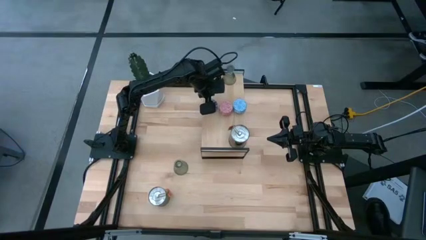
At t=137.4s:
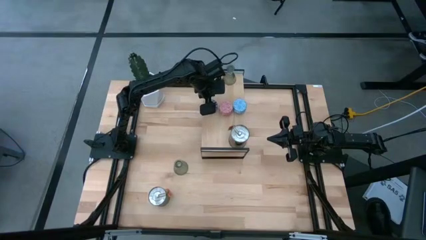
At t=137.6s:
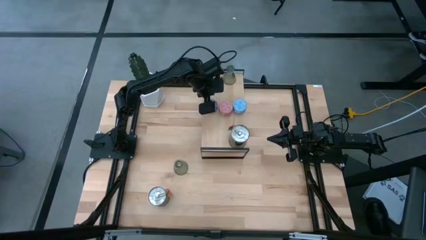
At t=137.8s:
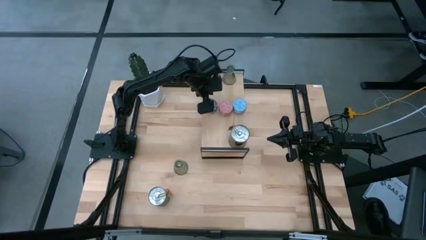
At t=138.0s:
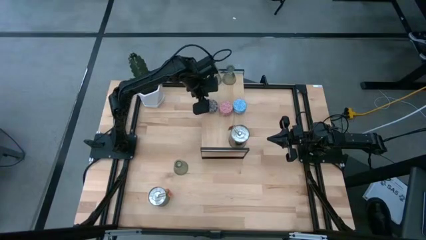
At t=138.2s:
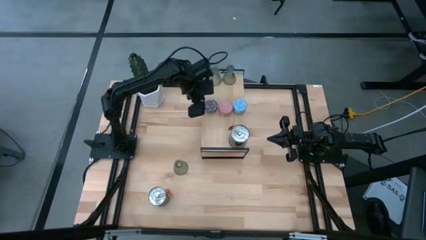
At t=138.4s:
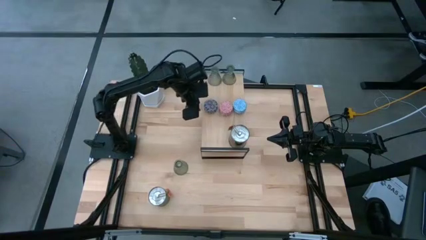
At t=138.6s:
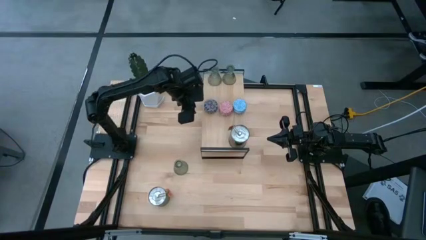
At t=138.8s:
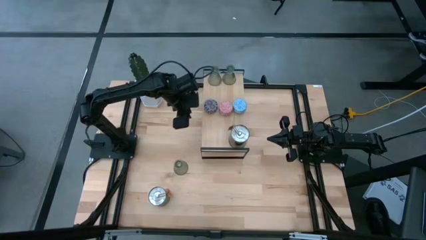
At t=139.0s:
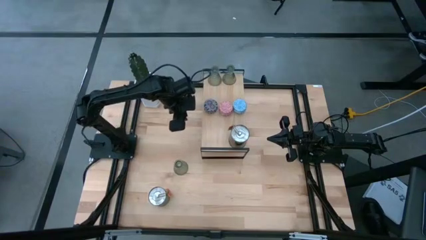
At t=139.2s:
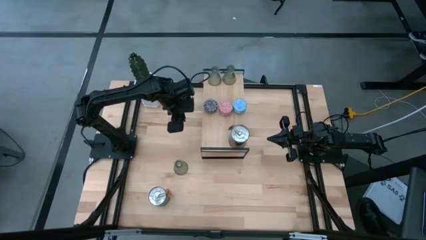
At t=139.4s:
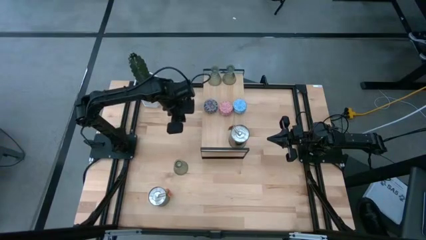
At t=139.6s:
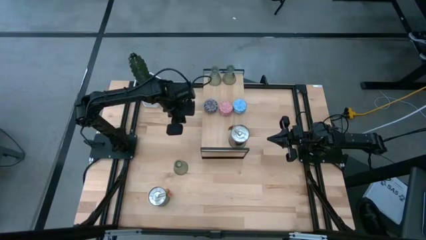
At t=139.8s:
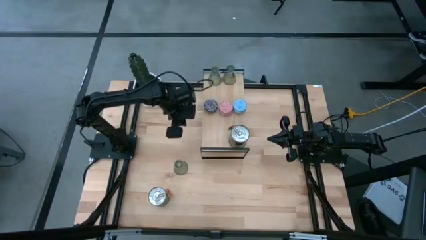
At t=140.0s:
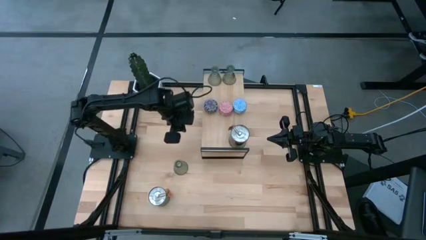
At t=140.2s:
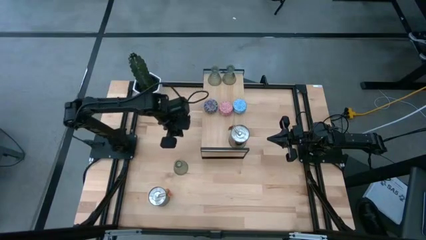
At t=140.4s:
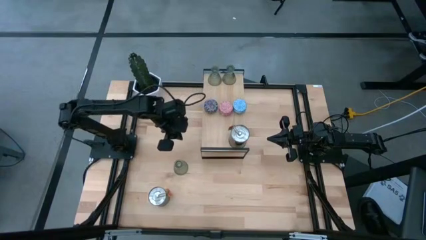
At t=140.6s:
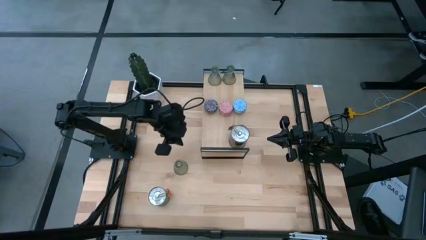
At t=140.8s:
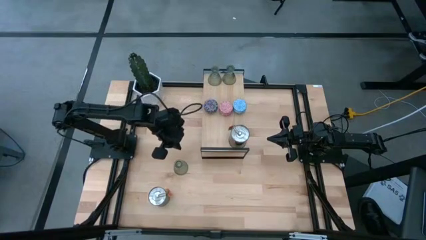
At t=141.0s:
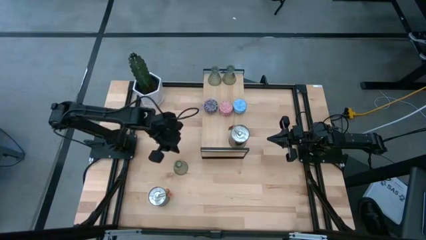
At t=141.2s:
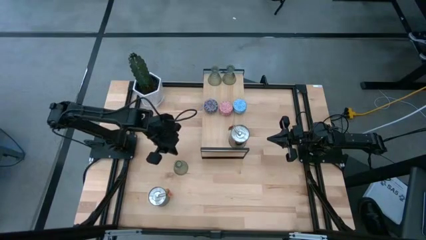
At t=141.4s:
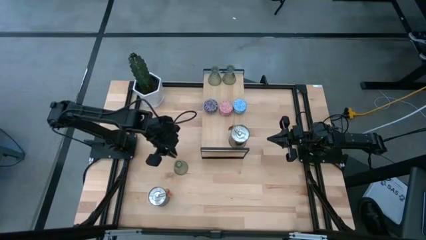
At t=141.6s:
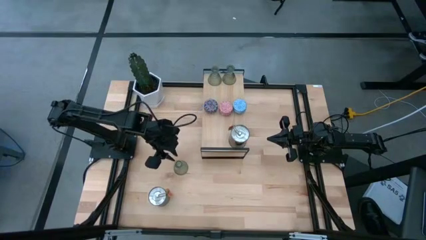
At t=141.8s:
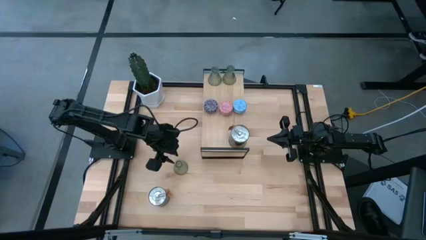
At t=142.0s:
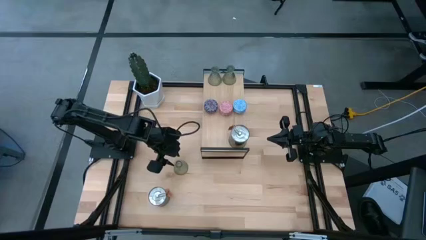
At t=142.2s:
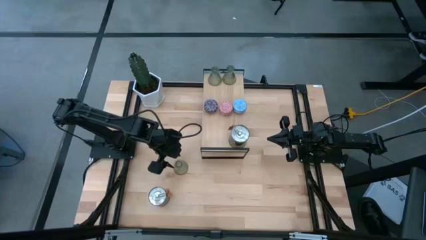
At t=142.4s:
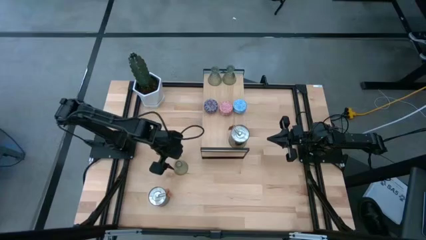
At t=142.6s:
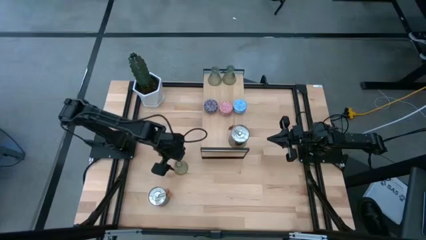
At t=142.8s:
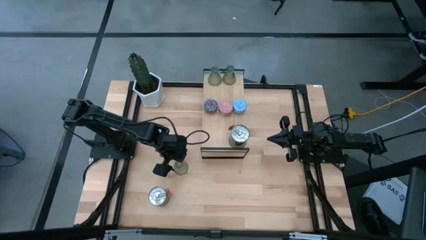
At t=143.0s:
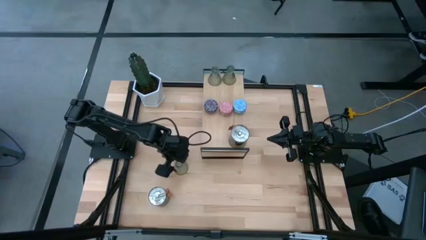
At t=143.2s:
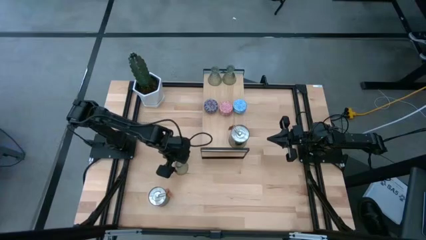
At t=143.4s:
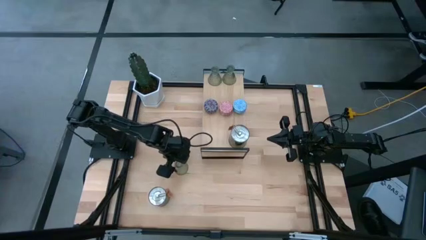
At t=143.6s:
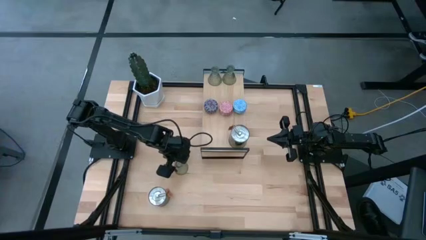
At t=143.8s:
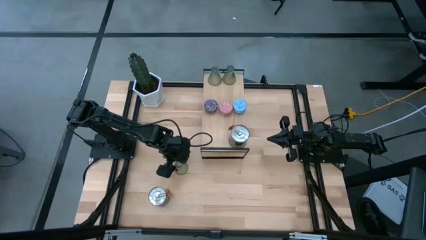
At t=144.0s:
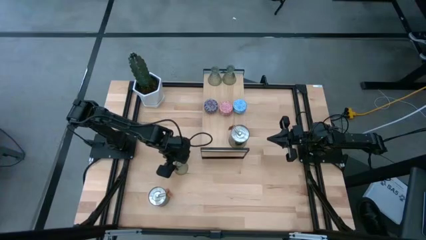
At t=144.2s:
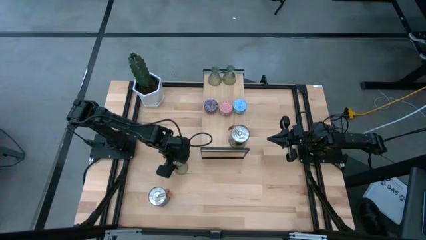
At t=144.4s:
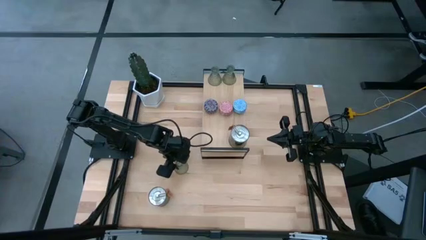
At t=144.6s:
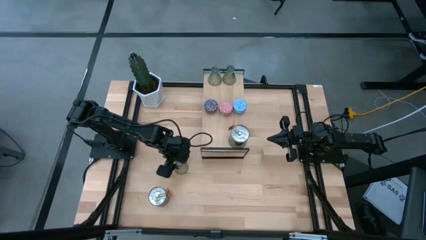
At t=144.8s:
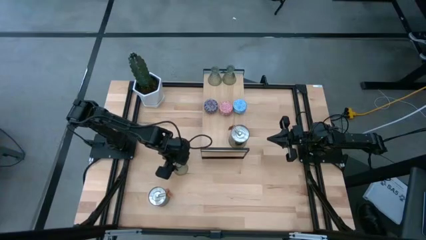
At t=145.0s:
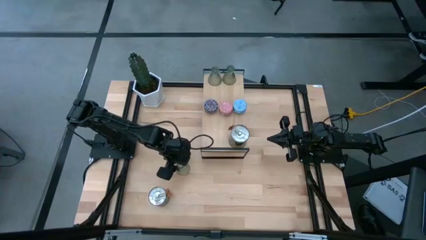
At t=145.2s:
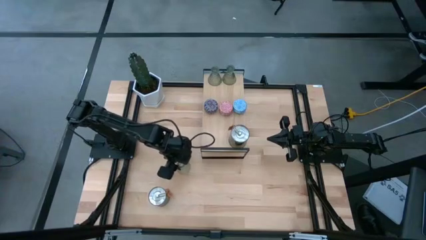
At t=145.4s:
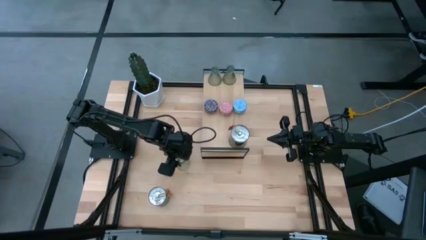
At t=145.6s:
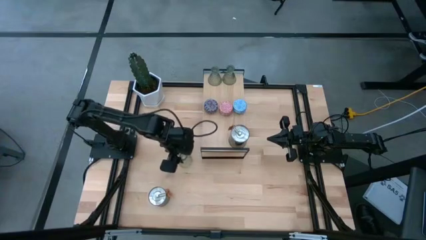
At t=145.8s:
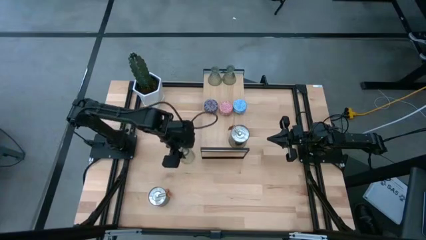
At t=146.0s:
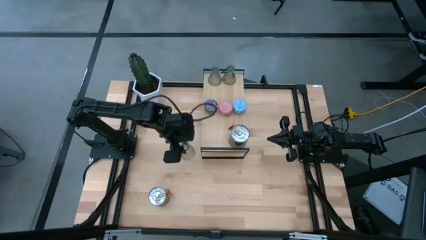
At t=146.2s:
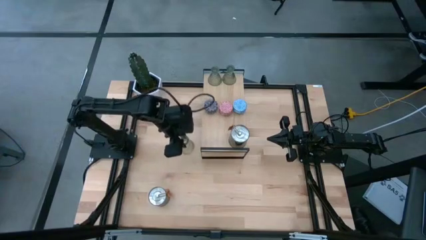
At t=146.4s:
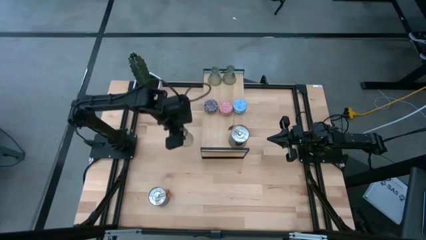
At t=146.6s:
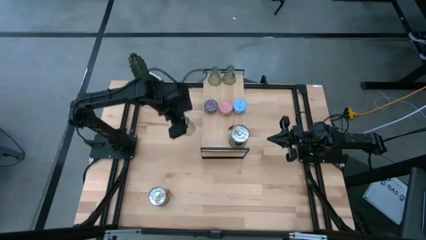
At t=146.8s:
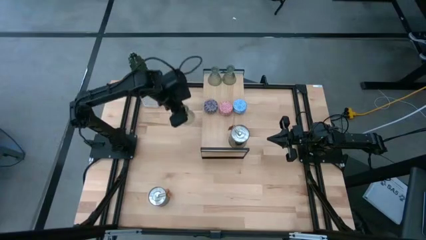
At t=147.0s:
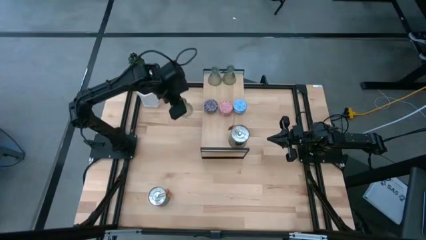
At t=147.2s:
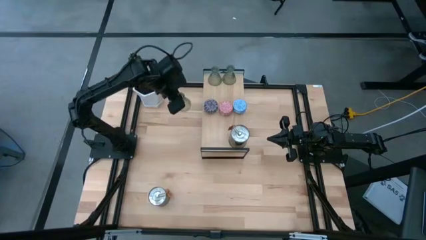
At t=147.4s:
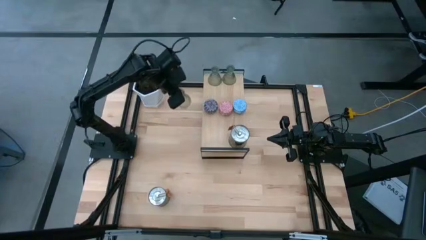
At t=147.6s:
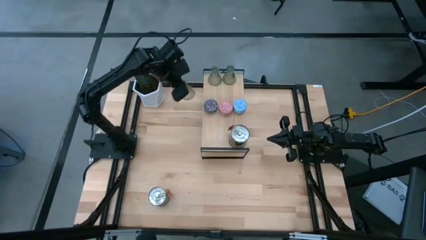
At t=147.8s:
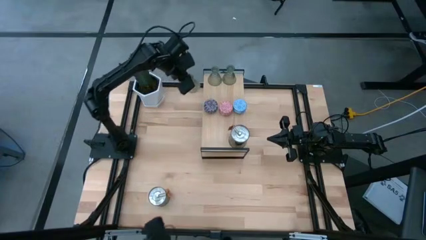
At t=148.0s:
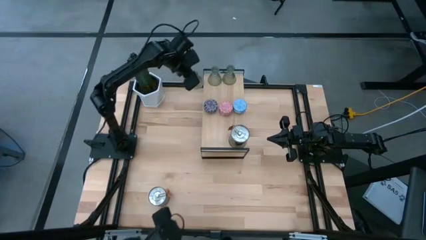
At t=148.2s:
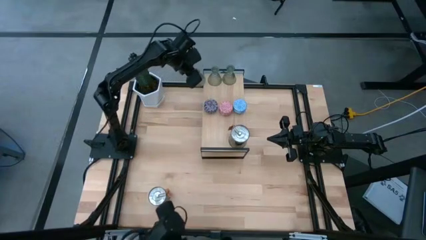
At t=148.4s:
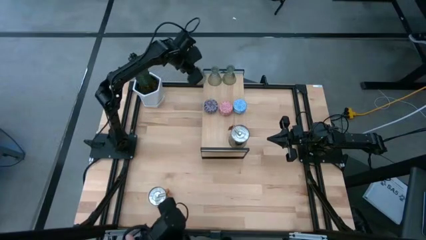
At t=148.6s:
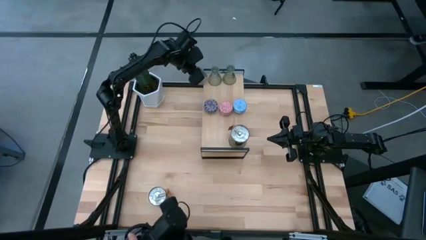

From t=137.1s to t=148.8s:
Task: Pick & Place candle stick holders
Put the transparent candle holder on the shelf

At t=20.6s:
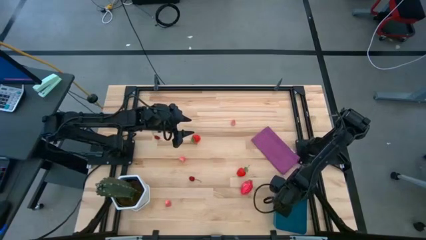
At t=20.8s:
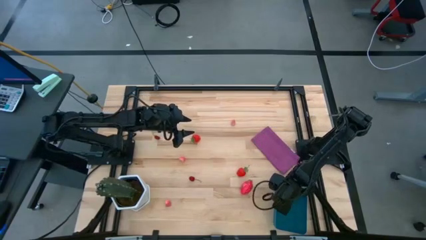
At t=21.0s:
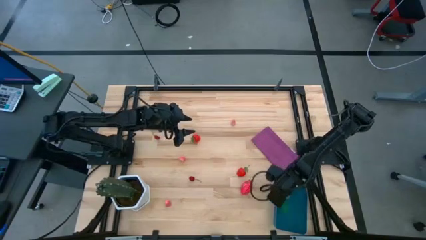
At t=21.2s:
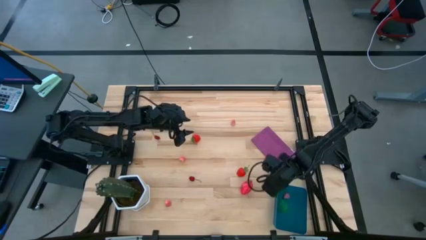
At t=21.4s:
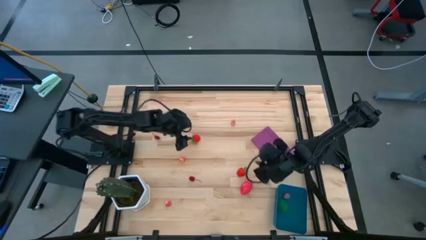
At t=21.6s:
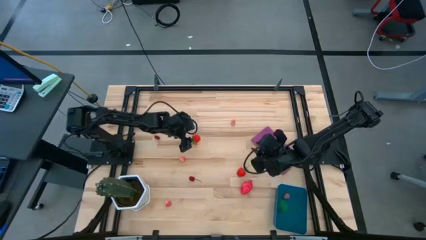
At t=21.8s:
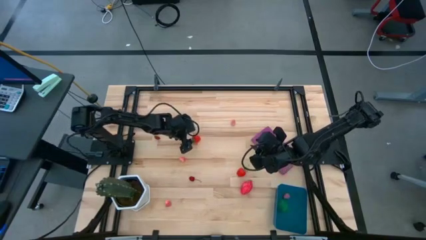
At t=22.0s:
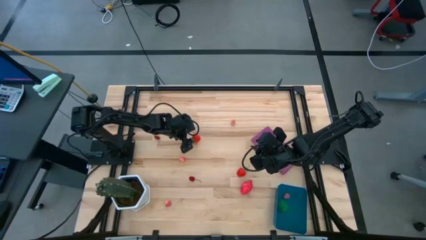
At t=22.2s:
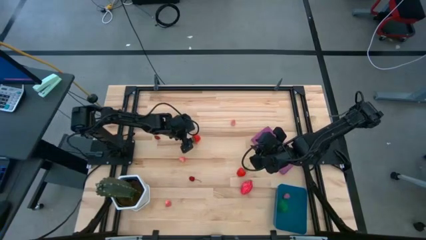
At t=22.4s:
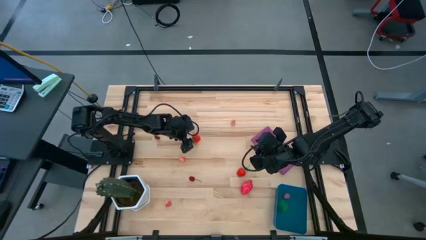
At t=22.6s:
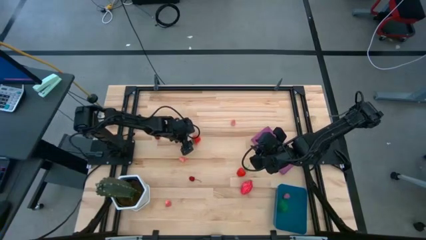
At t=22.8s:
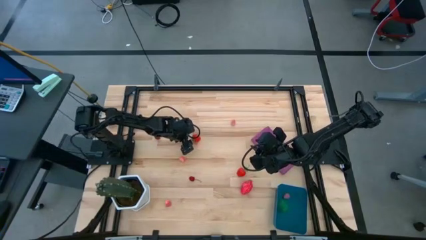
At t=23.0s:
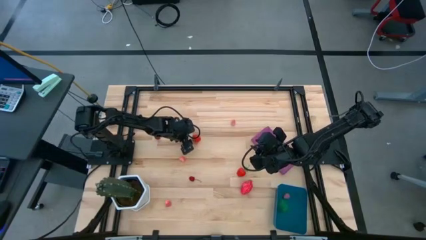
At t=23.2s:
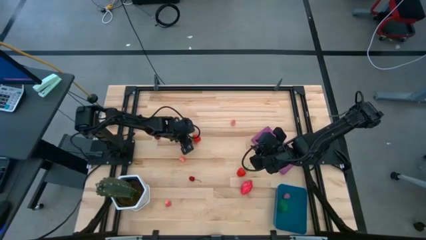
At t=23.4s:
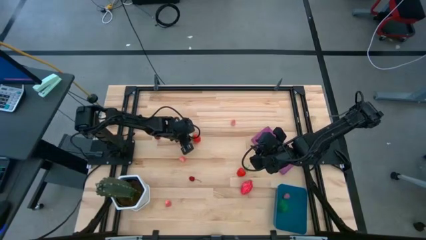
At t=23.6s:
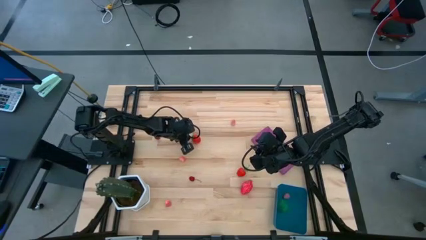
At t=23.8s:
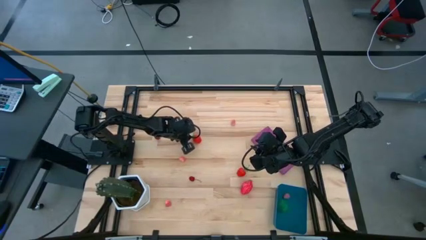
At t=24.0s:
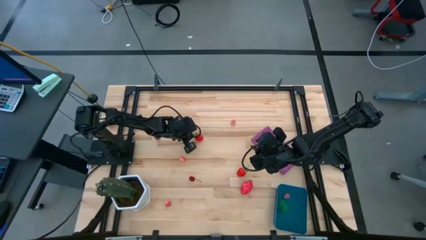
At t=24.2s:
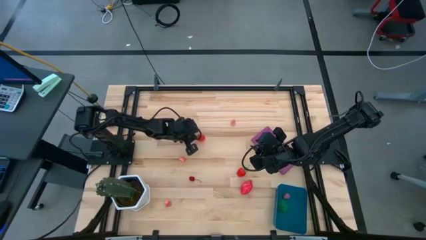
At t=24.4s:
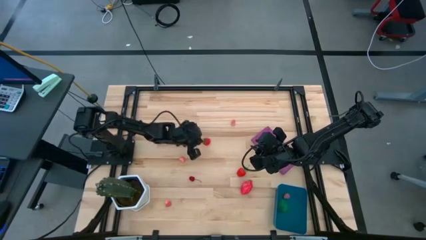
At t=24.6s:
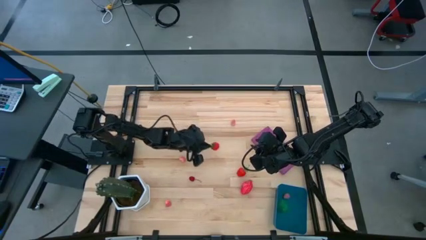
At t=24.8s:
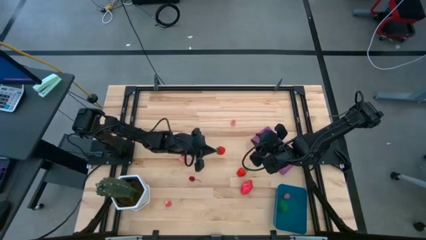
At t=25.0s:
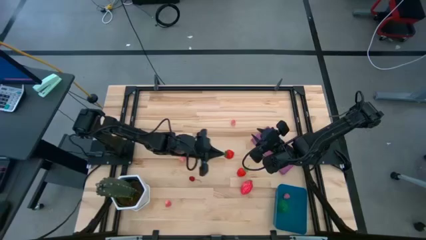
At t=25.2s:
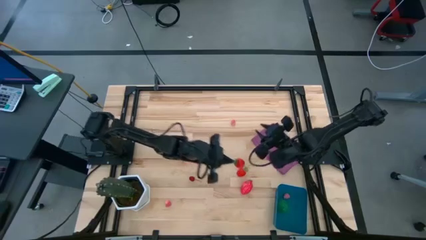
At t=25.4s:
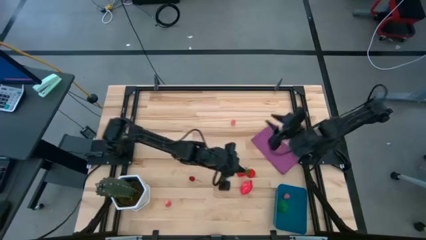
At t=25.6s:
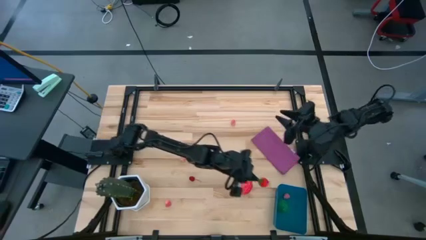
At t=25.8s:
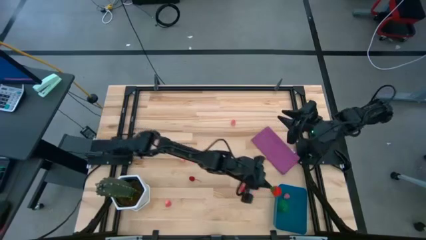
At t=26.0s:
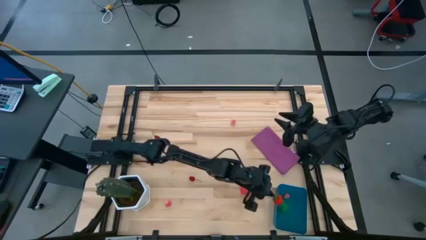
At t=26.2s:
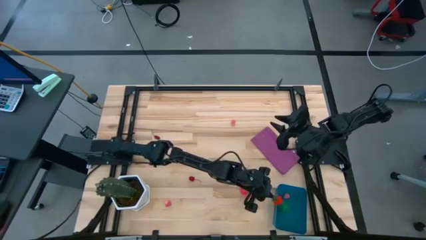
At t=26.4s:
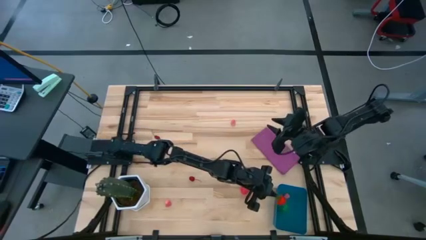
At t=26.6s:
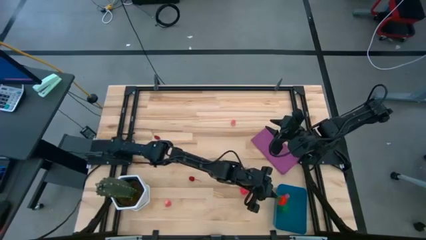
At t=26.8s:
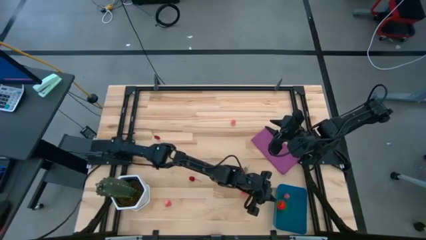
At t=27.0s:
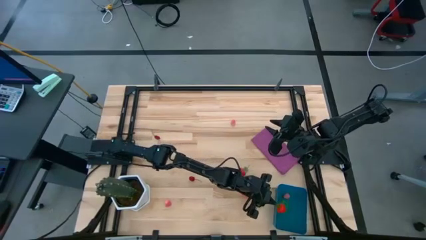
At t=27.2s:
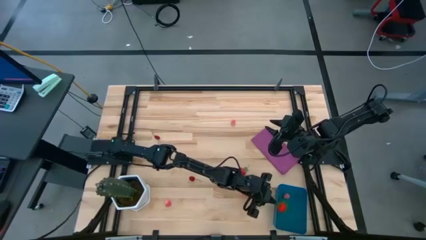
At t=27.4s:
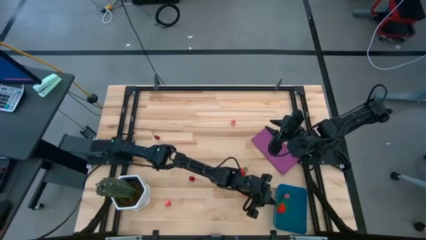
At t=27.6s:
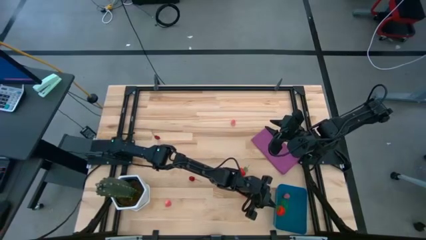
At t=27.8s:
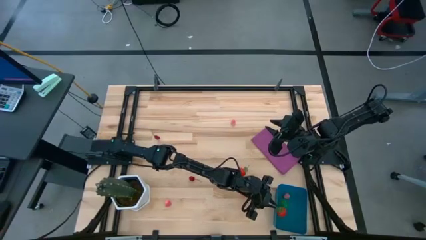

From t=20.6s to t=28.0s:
Task: Pick and placing Produce into tupperware
Put the red strawberry into the blue bin
